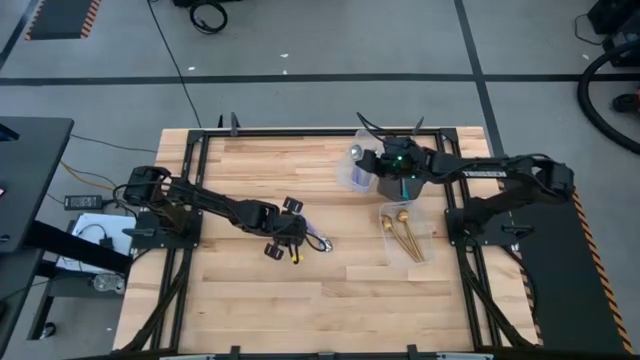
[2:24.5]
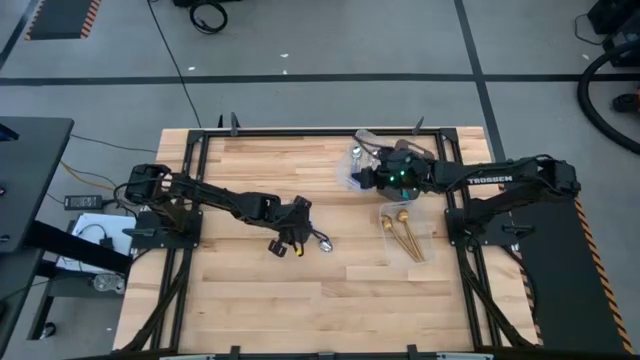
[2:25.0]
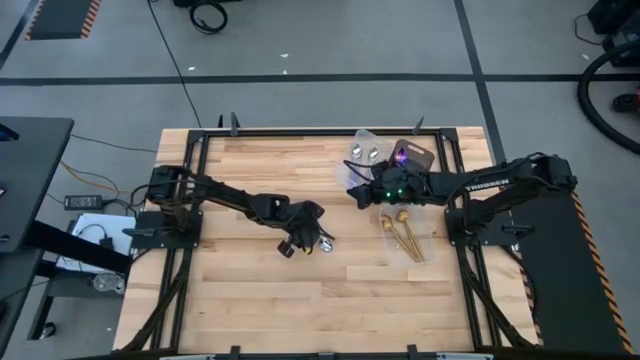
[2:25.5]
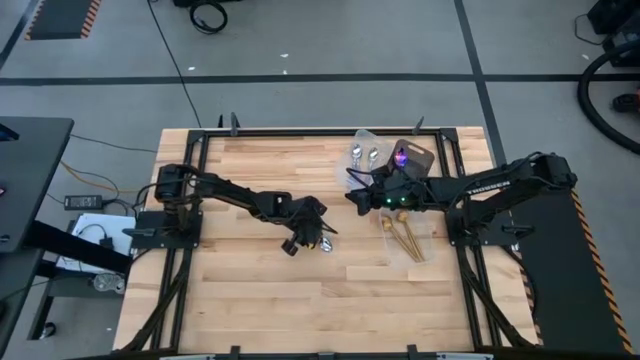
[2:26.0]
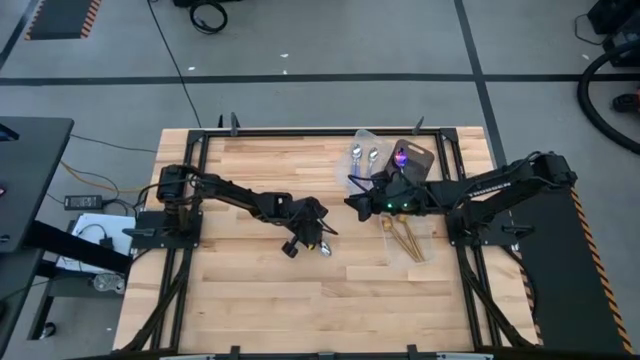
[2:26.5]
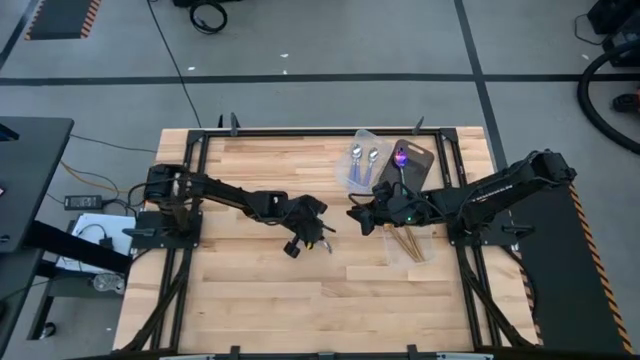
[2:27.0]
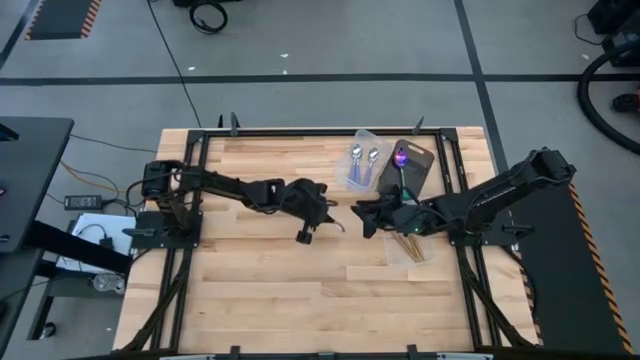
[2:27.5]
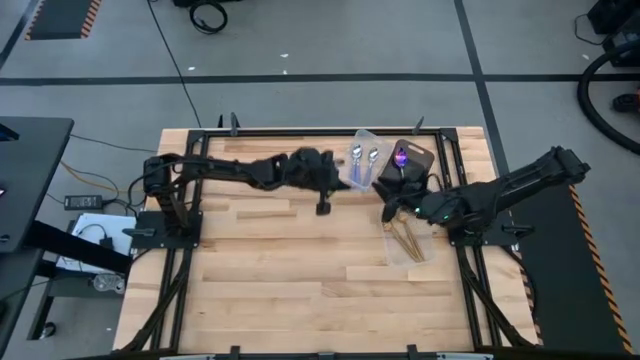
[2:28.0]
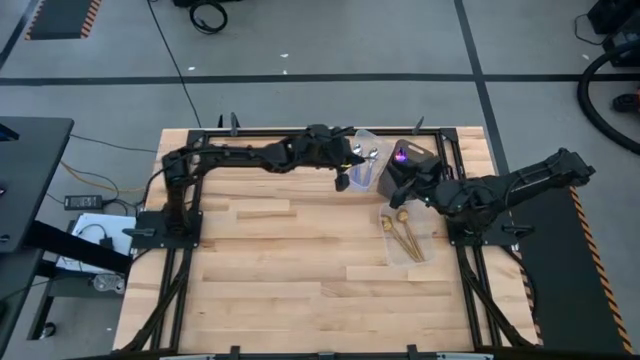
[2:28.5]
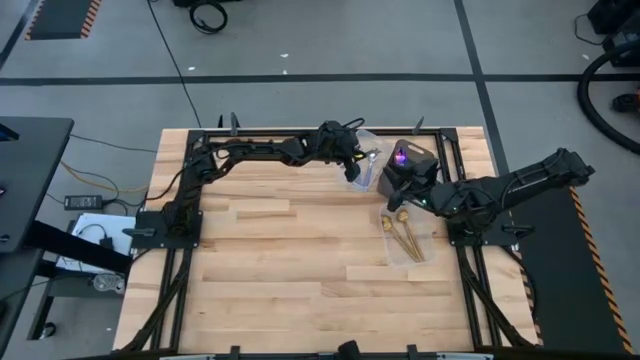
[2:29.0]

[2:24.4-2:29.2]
Task: Sort silverware by color (type)
Put the purple spoon into the top transparent bin

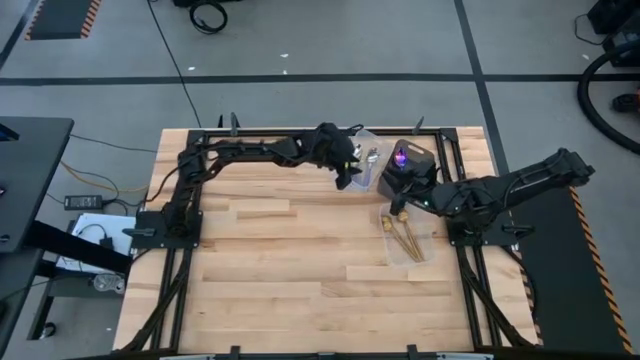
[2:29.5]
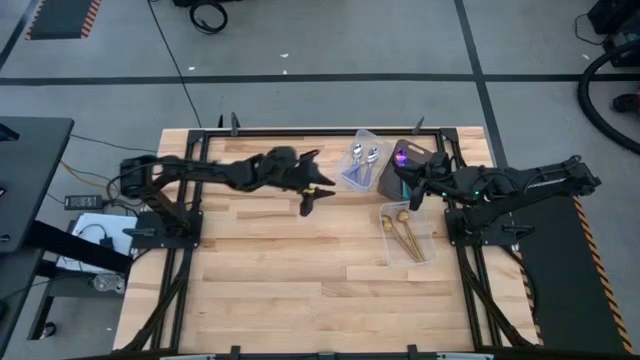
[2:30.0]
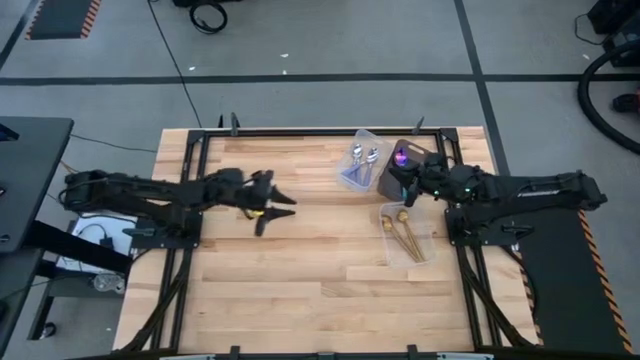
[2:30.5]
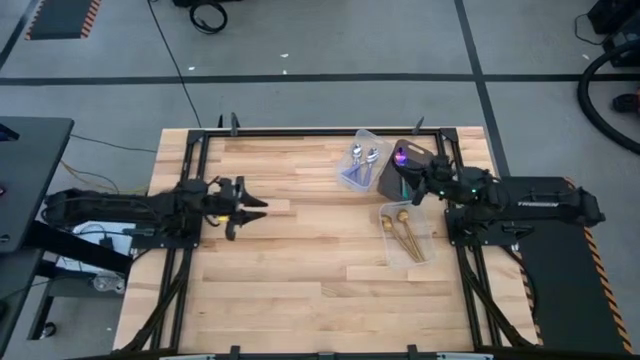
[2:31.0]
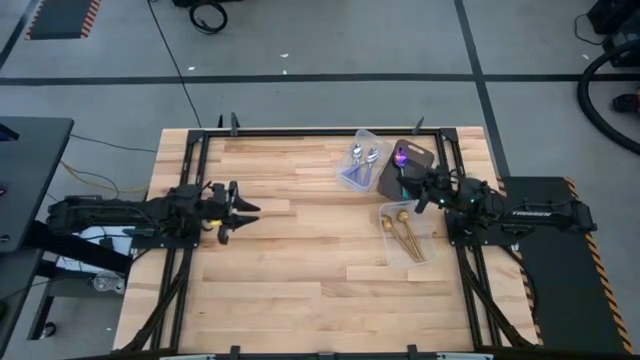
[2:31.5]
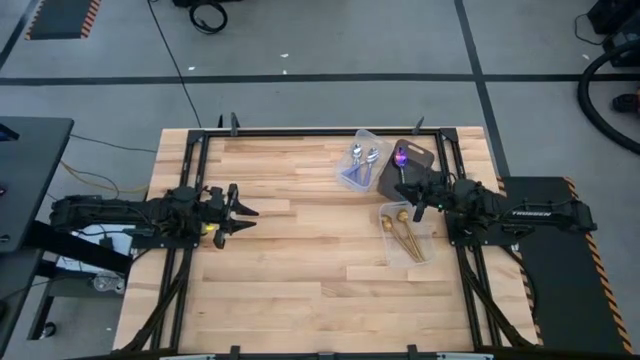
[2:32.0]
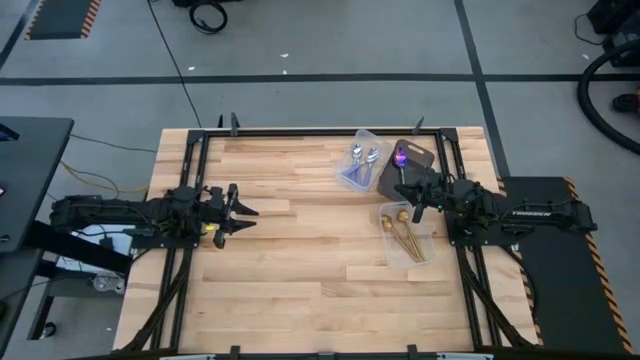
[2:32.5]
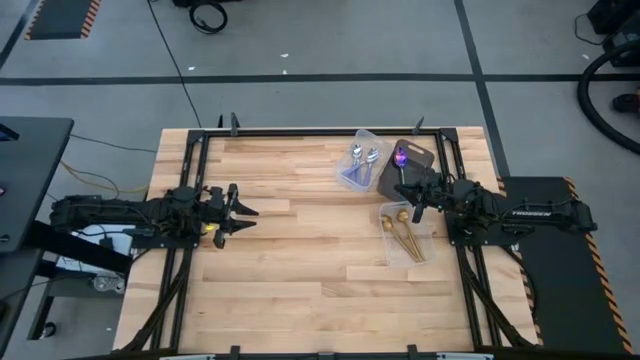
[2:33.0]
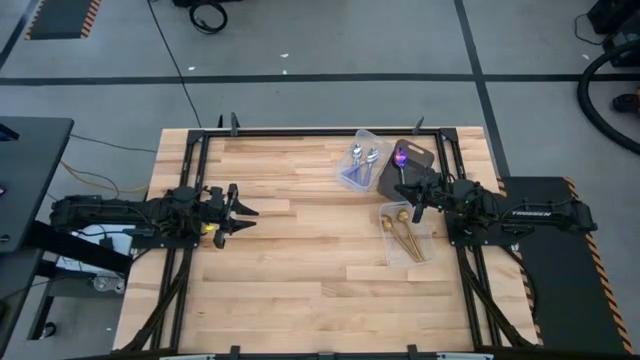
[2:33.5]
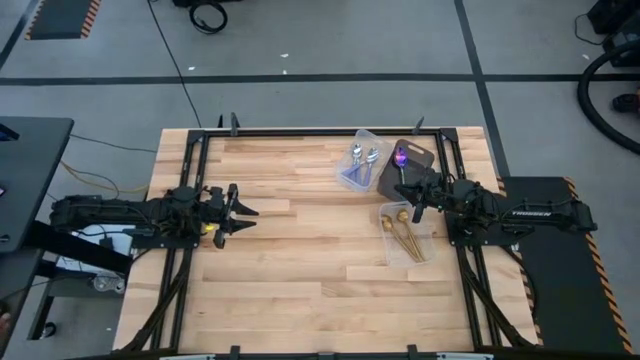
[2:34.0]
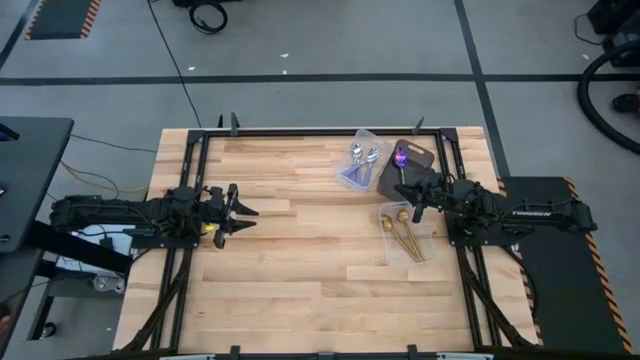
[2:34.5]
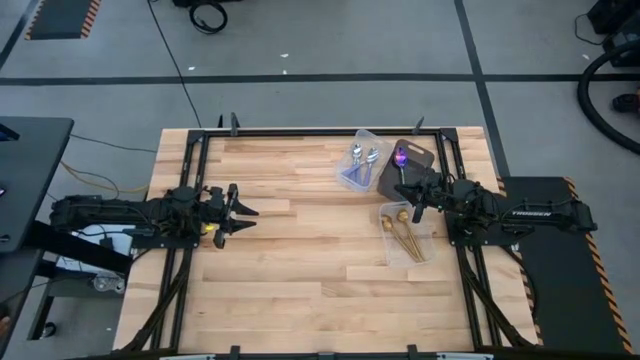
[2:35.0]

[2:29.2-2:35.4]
Return to Home Position

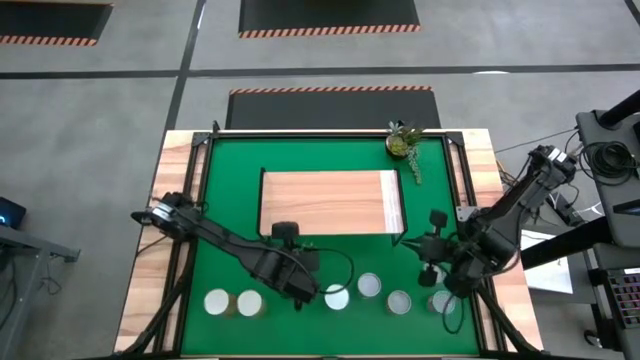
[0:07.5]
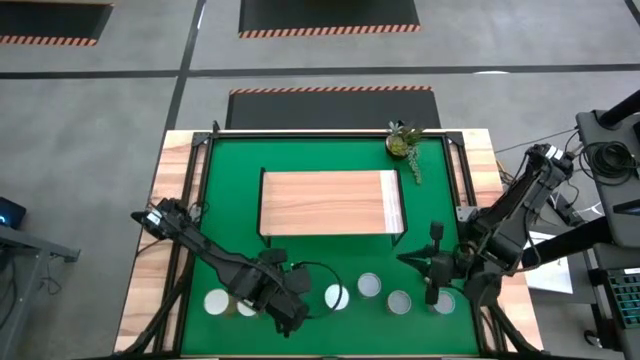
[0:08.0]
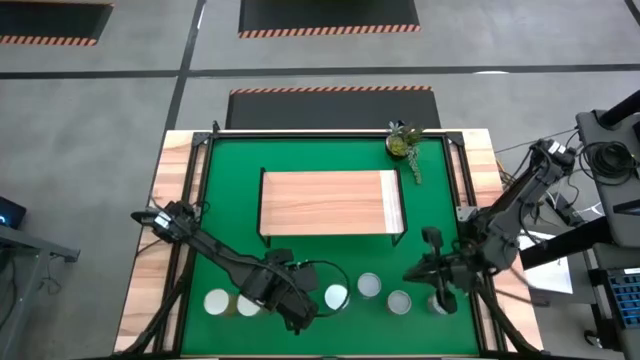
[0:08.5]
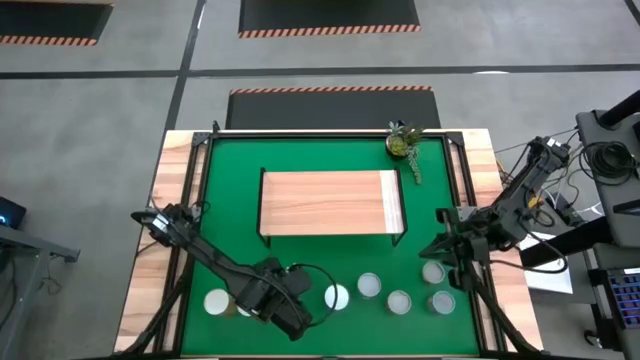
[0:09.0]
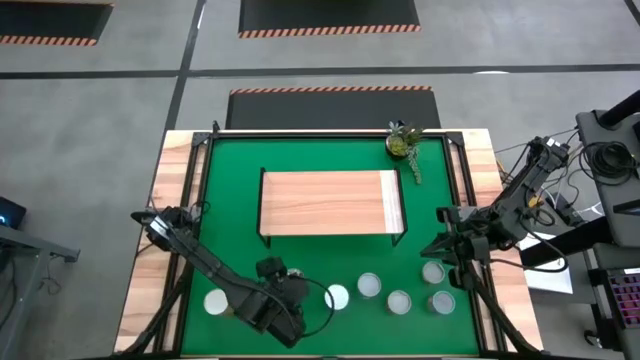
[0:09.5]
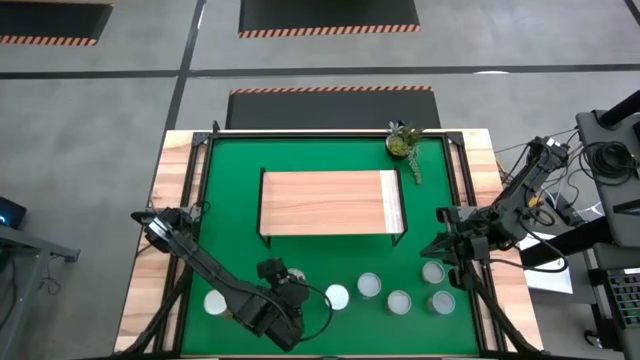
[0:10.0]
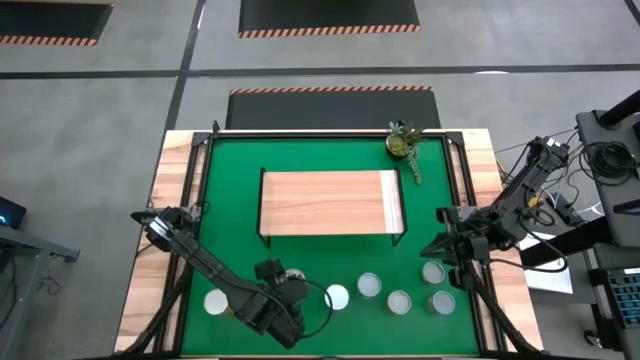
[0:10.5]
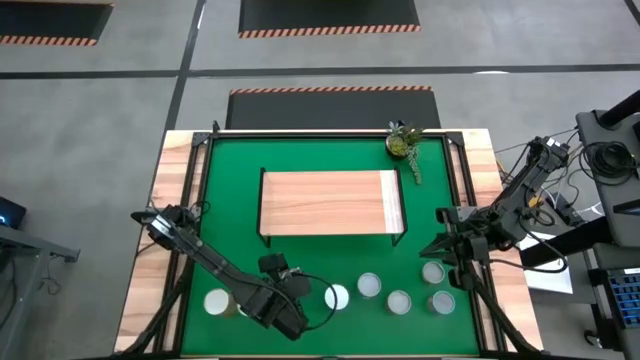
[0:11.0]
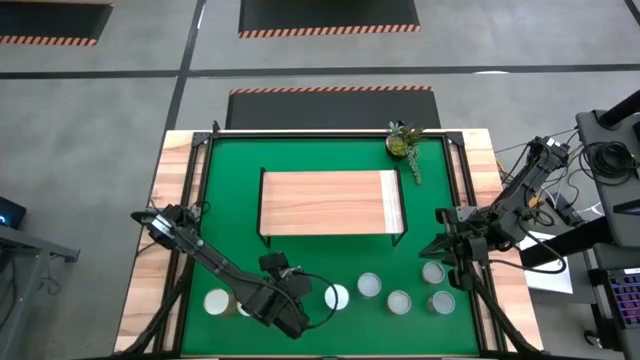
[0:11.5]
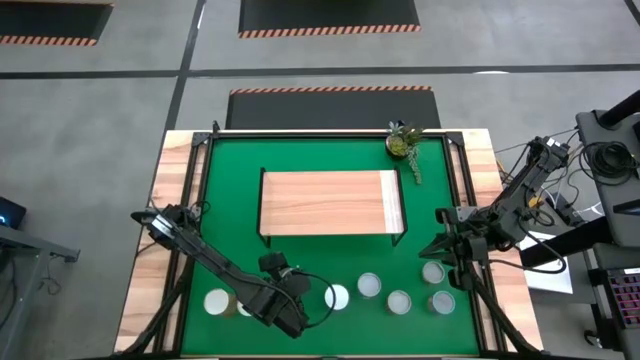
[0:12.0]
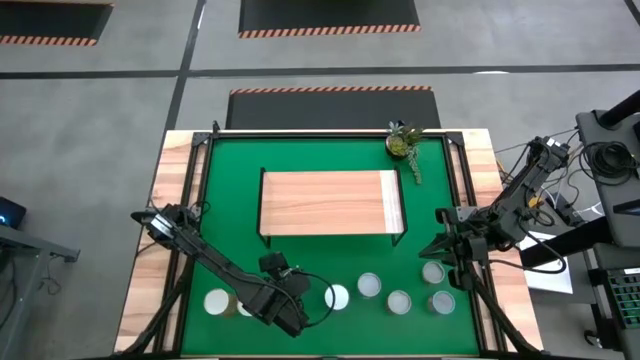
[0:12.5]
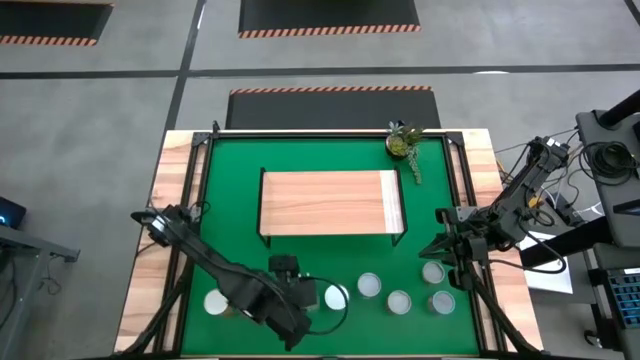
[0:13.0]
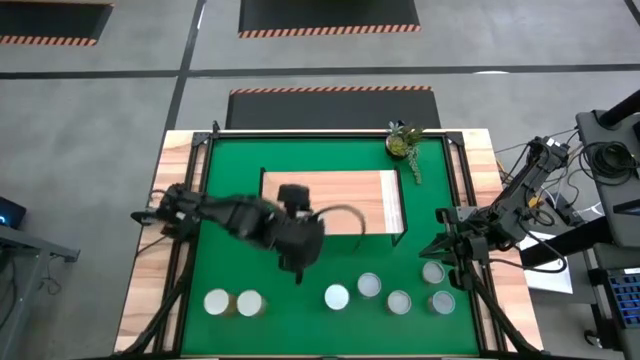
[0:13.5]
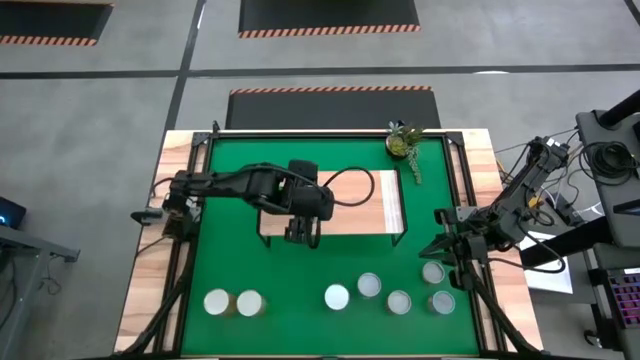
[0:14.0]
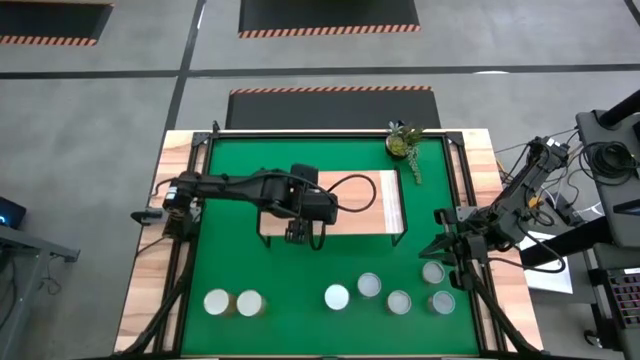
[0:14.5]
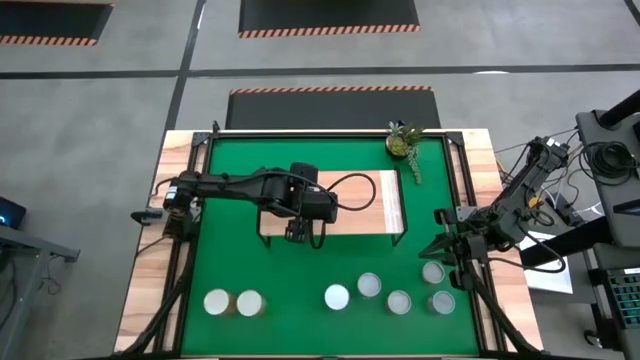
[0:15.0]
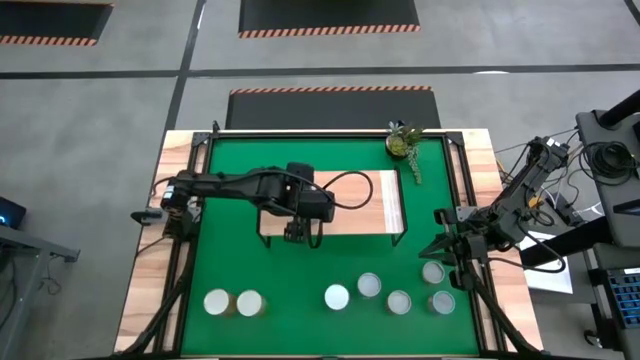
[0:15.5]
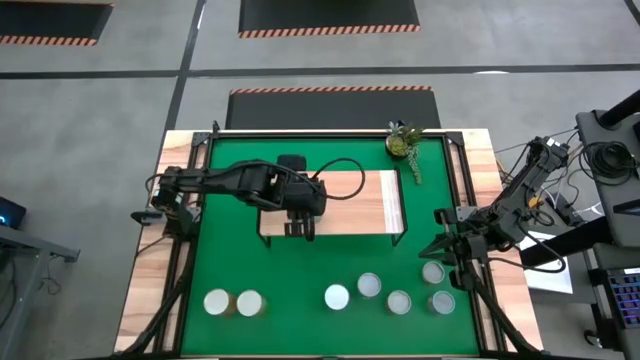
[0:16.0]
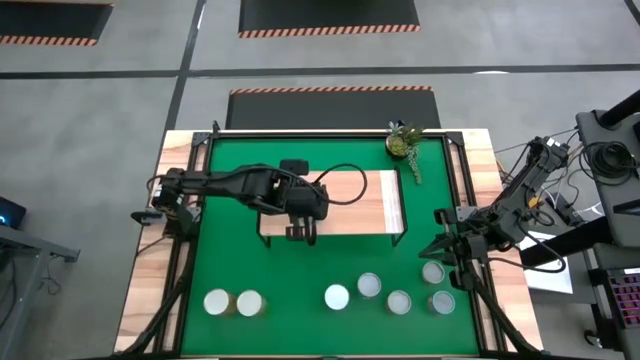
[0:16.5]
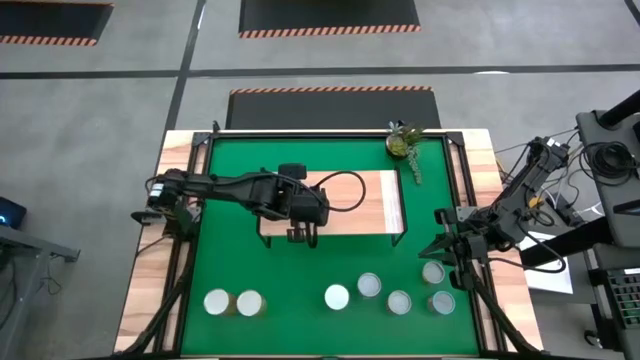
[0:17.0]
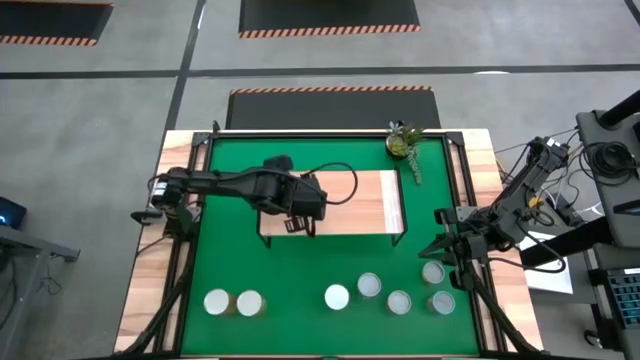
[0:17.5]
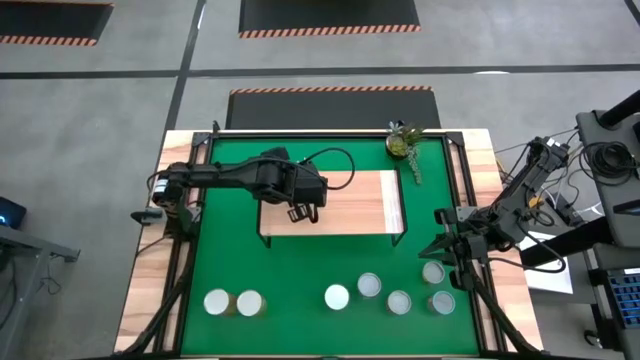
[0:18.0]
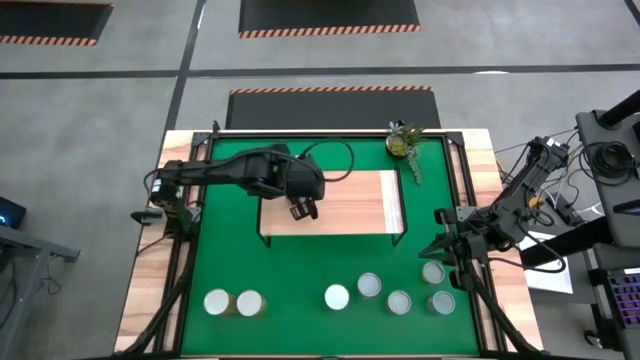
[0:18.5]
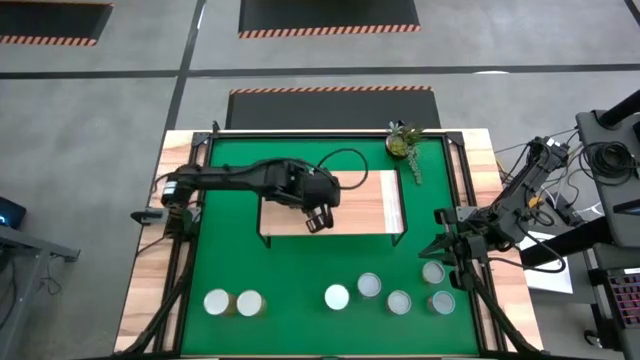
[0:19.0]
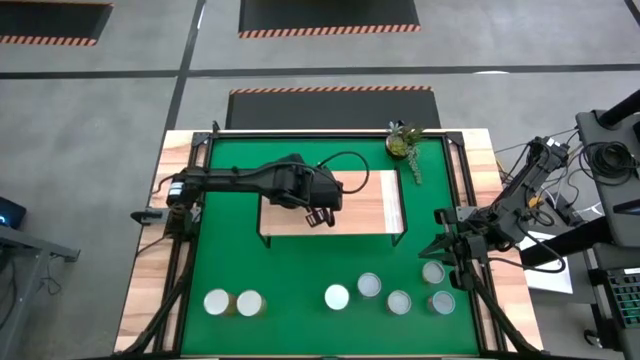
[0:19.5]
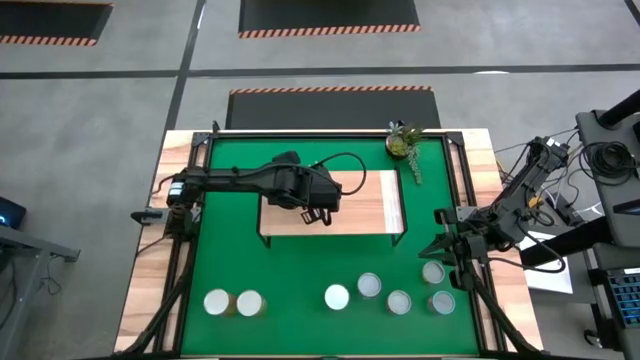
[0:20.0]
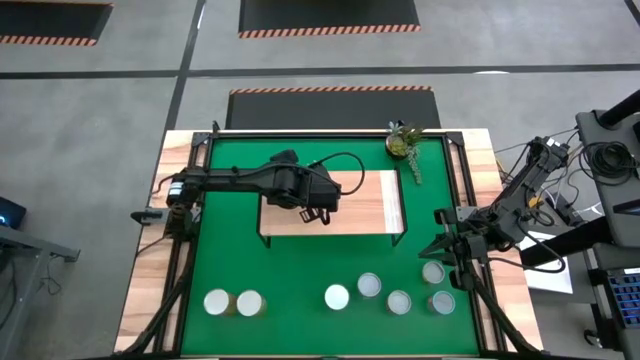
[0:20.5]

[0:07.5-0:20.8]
Task: Pick and place cans onto a shelf
Put the canned cherries on the shelf
